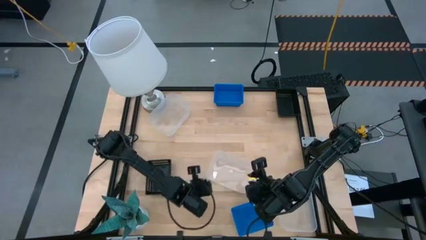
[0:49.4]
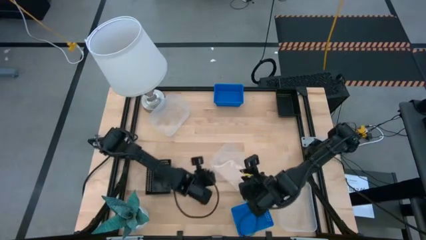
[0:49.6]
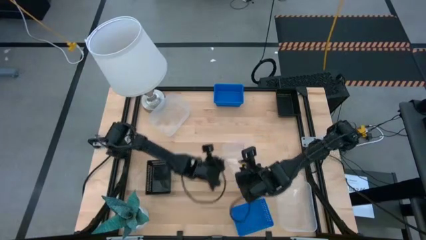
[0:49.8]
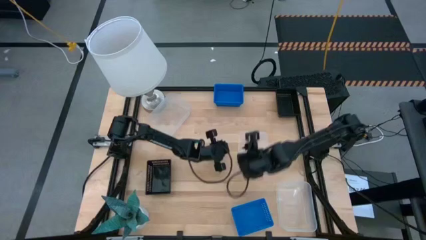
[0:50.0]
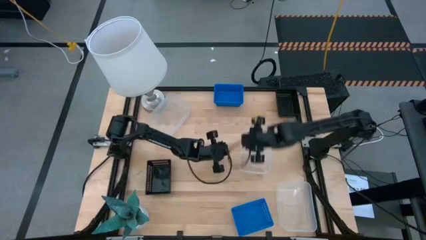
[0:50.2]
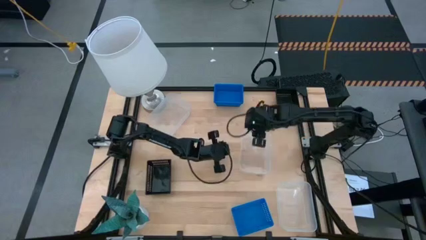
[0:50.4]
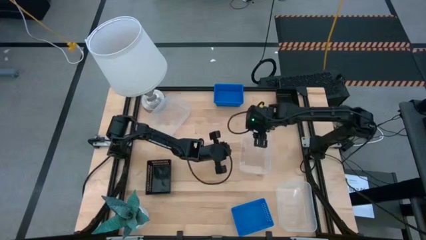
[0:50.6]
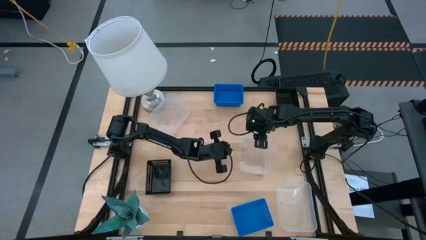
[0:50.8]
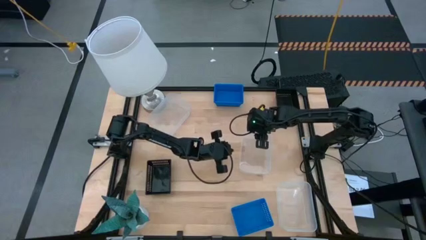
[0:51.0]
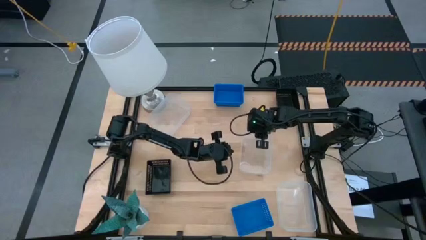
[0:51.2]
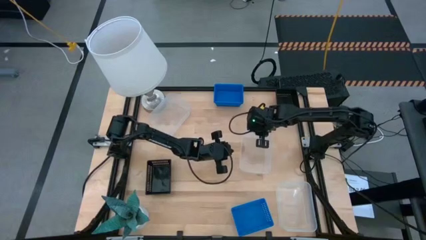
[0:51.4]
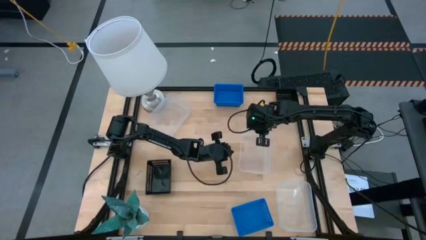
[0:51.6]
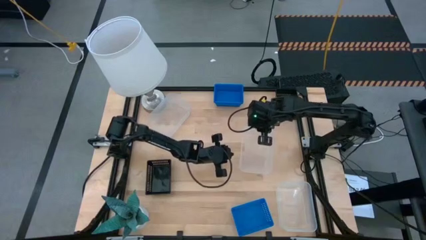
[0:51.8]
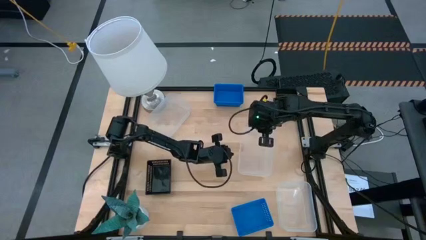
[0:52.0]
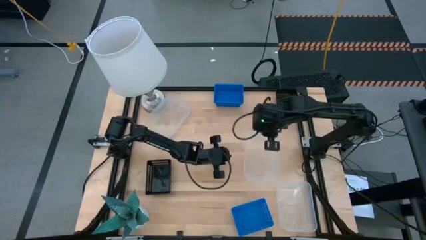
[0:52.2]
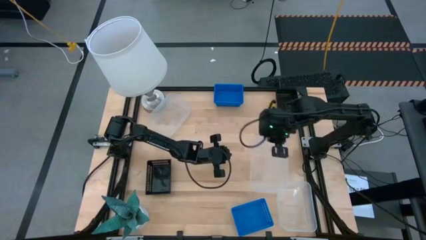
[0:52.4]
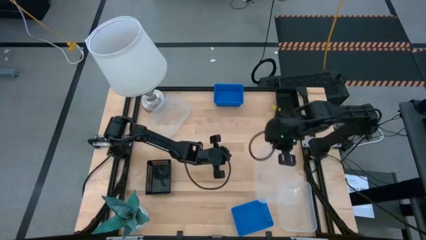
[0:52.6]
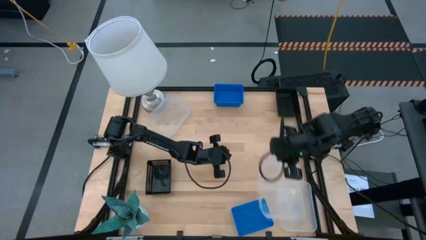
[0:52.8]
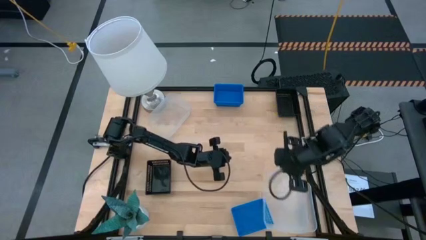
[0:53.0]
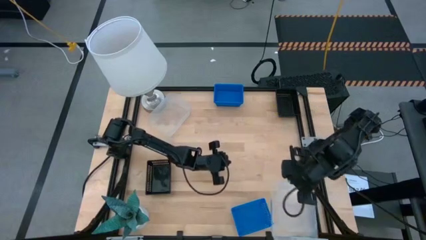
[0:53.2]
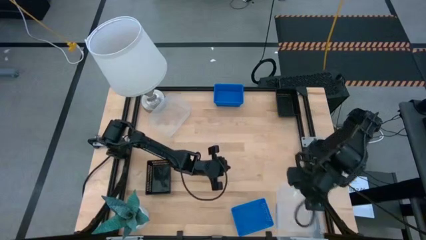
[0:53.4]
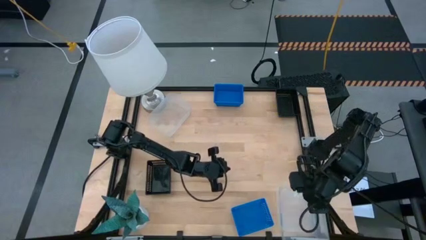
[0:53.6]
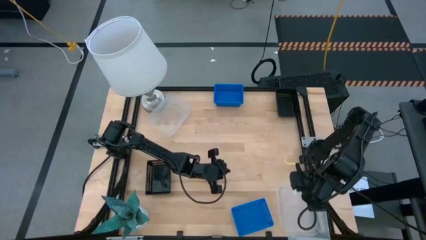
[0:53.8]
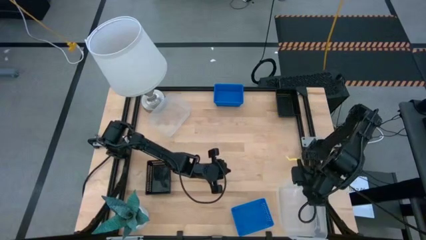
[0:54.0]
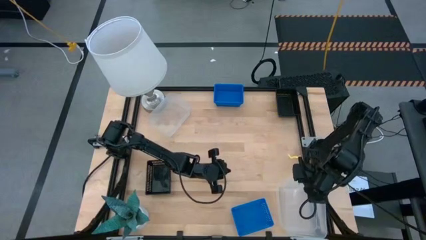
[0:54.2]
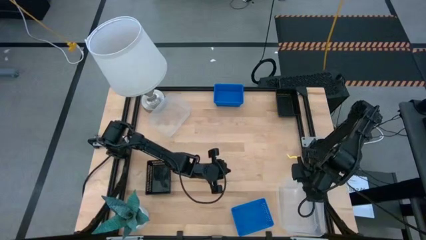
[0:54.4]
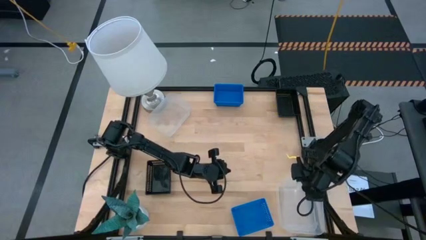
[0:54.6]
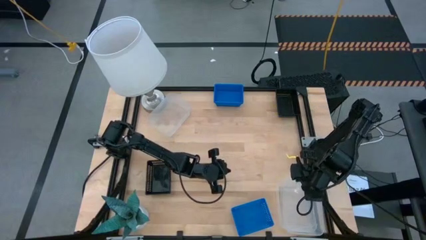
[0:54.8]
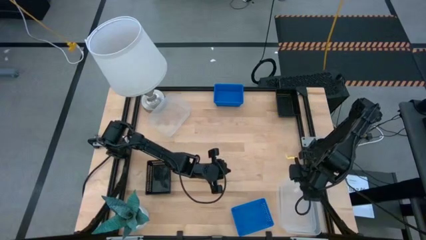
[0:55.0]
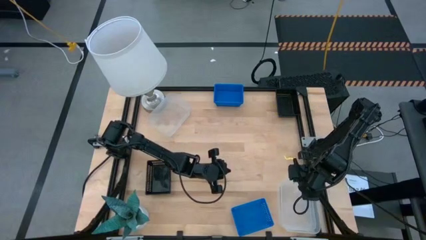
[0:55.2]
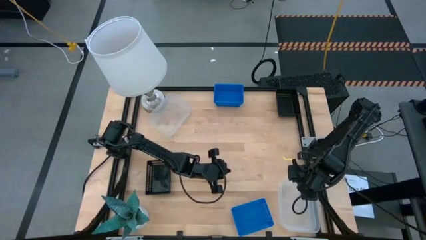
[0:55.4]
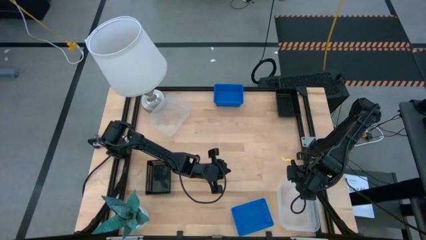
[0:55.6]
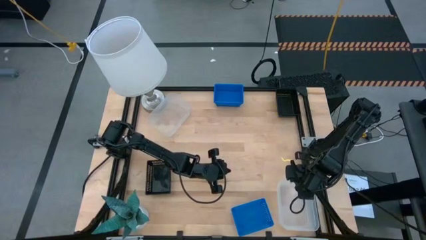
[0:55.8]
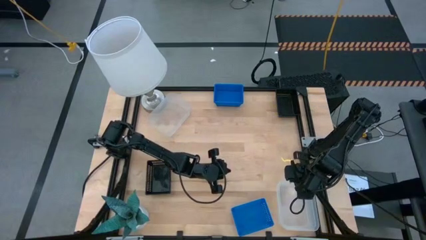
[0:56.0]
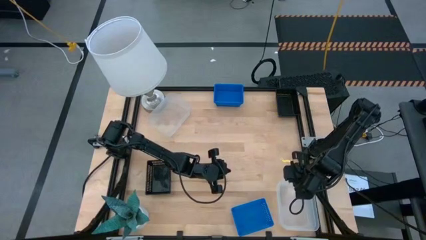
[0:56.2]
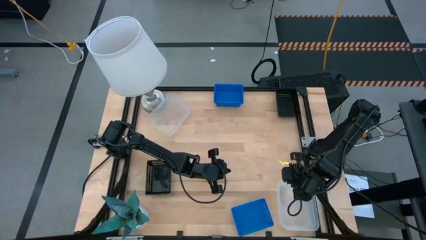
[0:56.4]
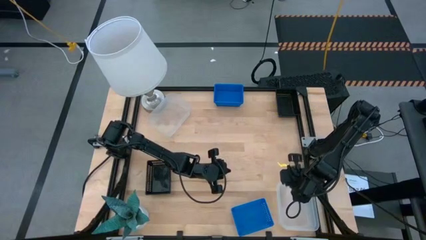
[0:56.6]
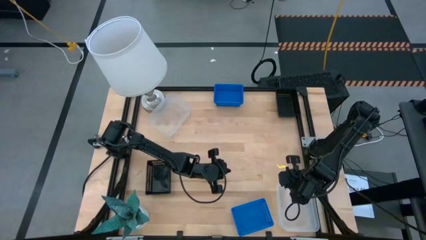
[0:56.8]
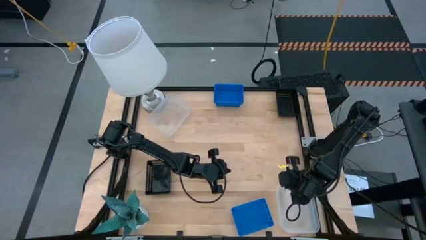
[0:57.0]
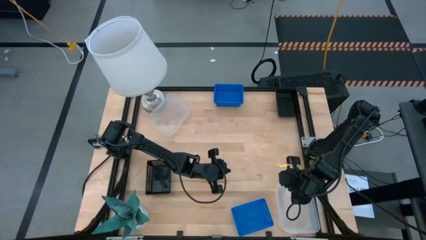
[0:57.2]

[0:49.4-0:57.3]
Stack the middle transparent bin on top of the bottom transparent bin
